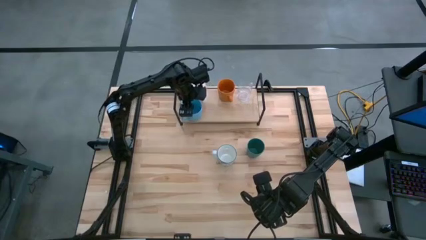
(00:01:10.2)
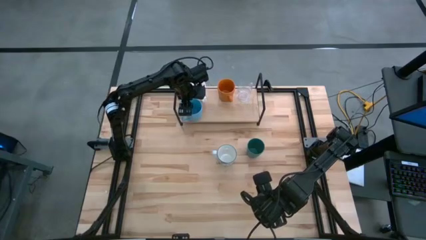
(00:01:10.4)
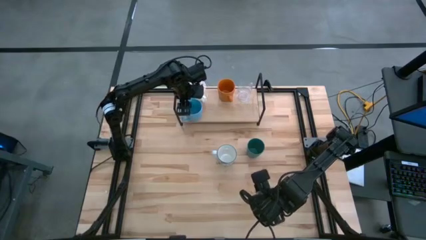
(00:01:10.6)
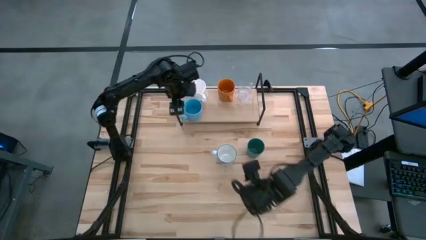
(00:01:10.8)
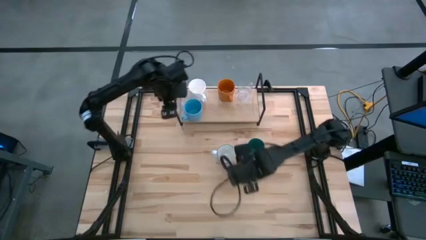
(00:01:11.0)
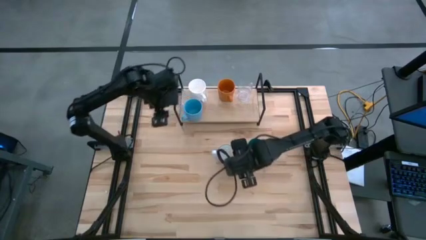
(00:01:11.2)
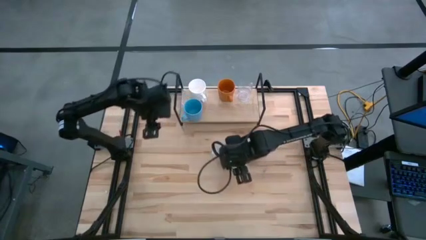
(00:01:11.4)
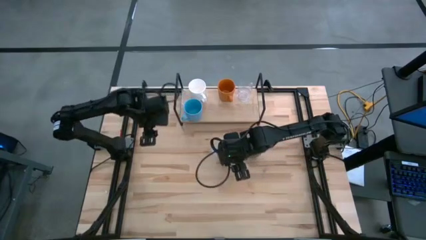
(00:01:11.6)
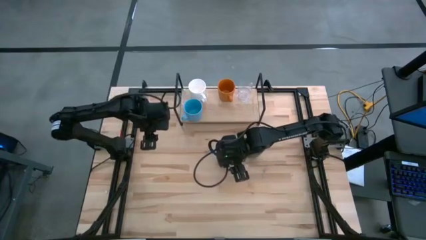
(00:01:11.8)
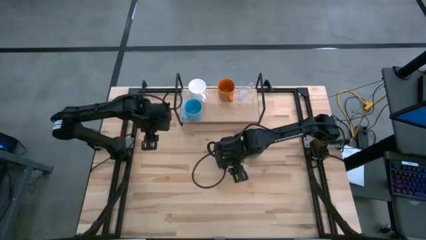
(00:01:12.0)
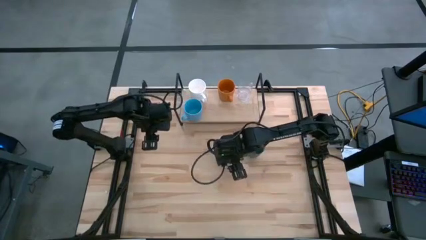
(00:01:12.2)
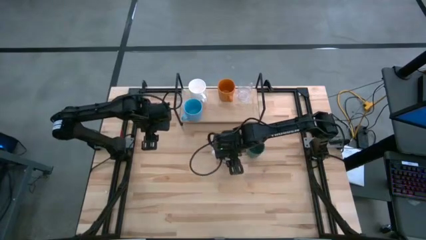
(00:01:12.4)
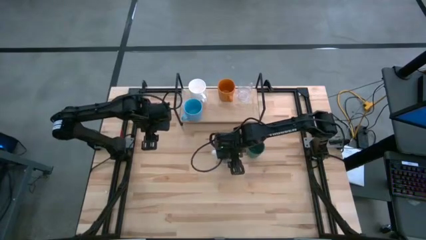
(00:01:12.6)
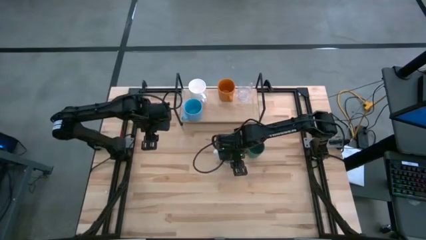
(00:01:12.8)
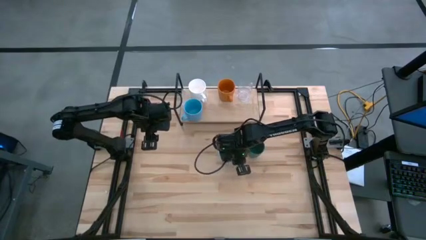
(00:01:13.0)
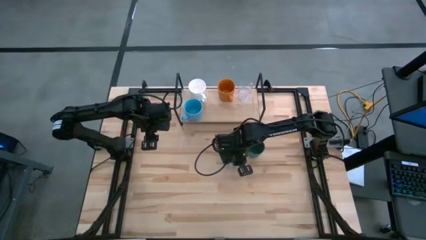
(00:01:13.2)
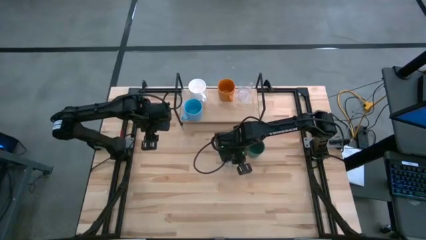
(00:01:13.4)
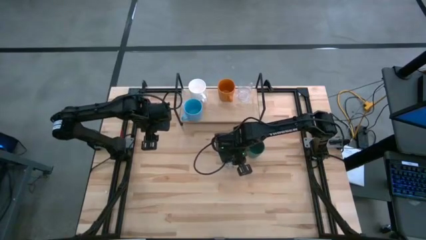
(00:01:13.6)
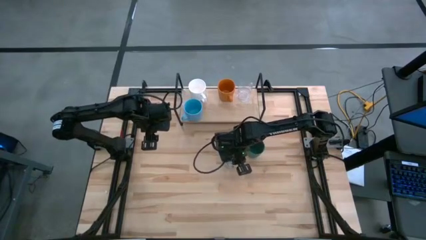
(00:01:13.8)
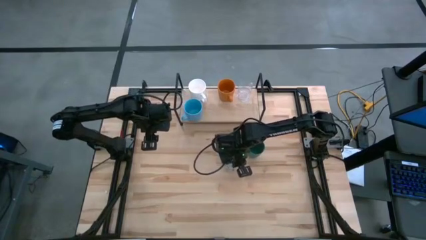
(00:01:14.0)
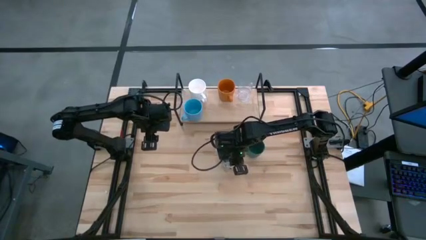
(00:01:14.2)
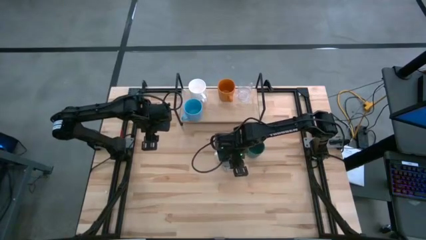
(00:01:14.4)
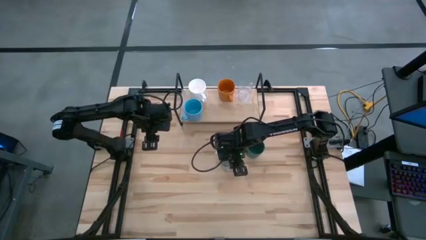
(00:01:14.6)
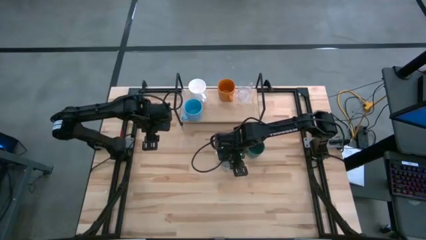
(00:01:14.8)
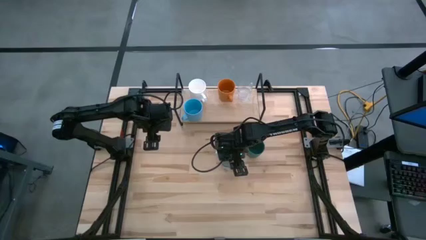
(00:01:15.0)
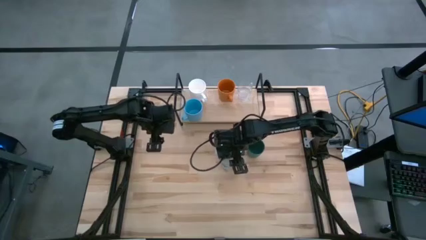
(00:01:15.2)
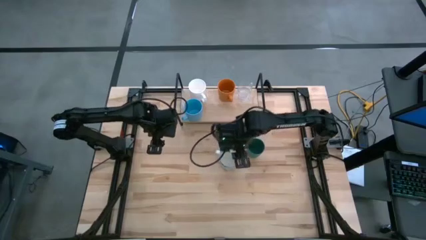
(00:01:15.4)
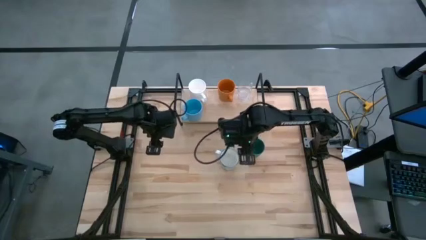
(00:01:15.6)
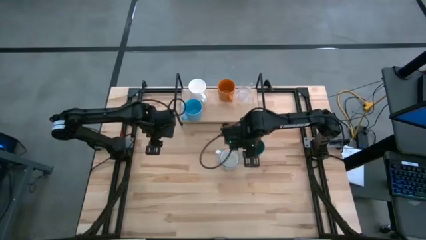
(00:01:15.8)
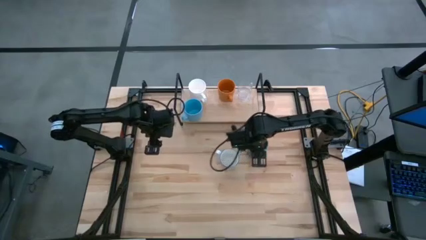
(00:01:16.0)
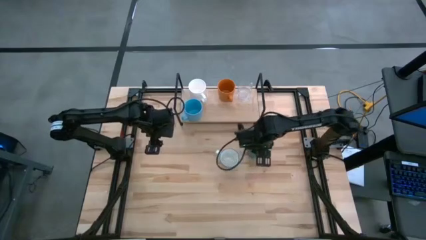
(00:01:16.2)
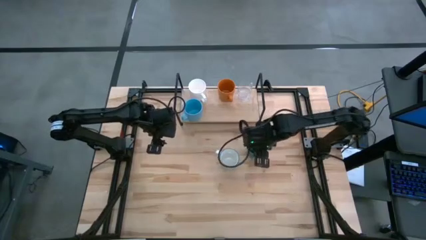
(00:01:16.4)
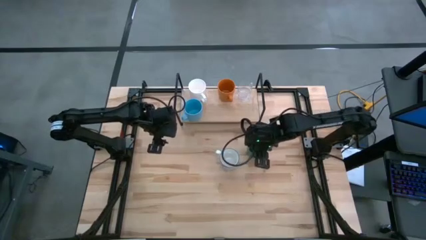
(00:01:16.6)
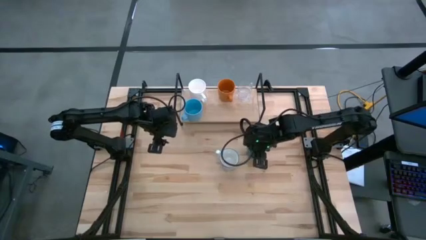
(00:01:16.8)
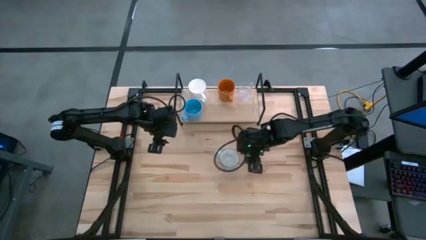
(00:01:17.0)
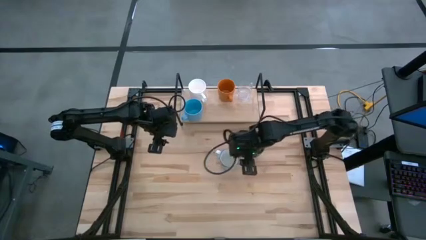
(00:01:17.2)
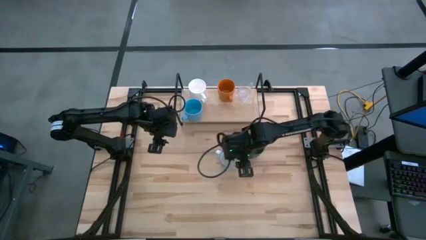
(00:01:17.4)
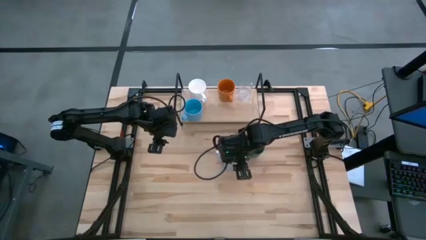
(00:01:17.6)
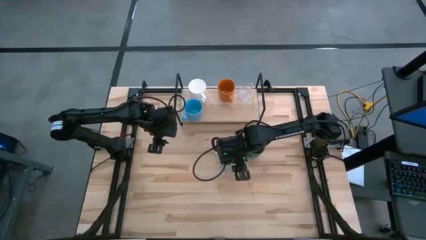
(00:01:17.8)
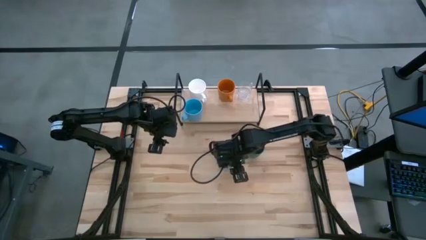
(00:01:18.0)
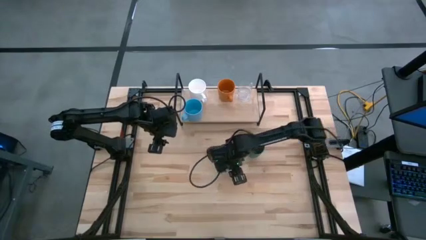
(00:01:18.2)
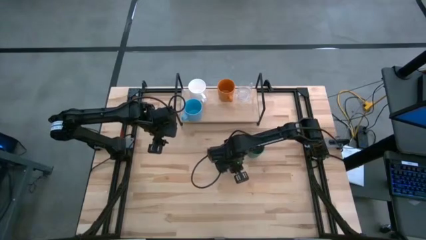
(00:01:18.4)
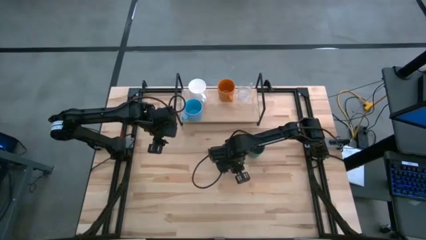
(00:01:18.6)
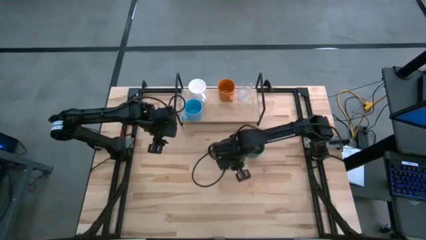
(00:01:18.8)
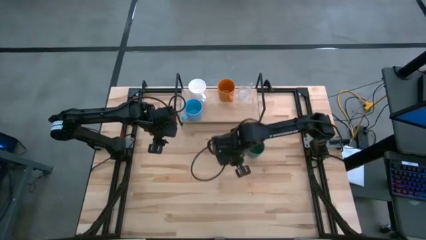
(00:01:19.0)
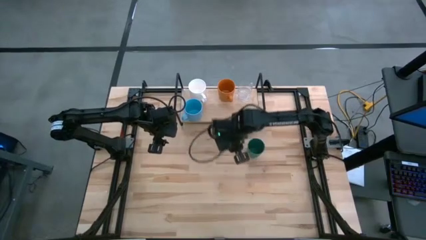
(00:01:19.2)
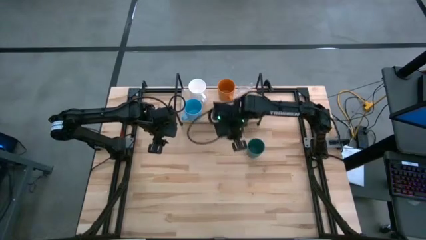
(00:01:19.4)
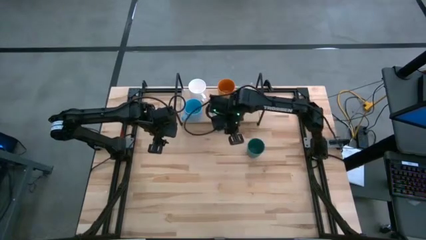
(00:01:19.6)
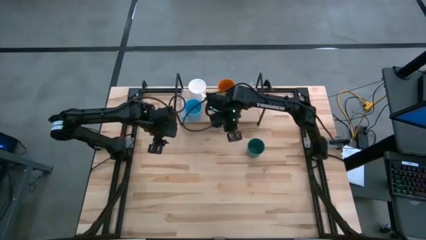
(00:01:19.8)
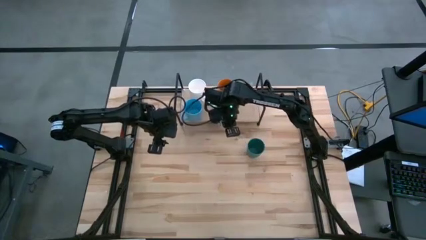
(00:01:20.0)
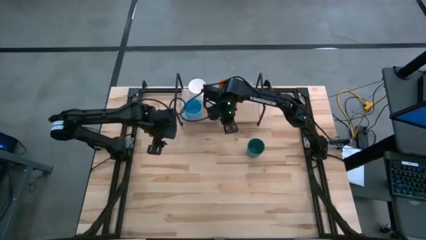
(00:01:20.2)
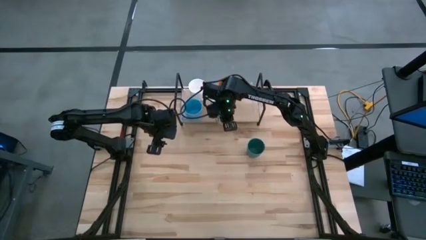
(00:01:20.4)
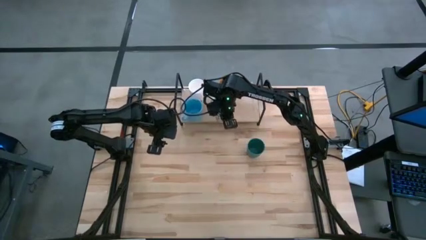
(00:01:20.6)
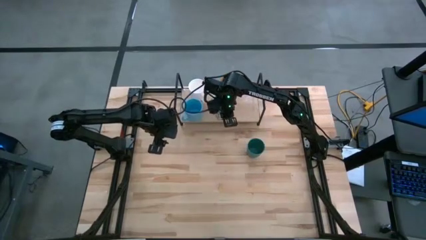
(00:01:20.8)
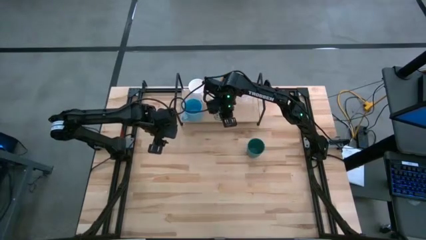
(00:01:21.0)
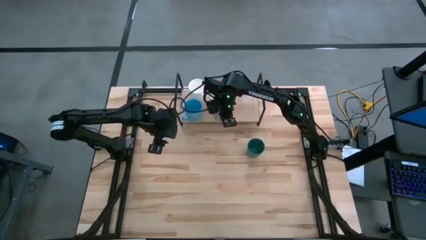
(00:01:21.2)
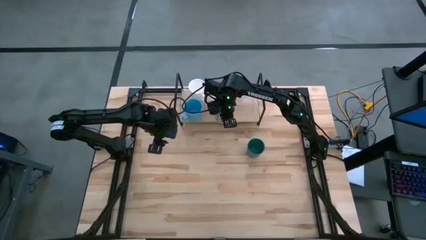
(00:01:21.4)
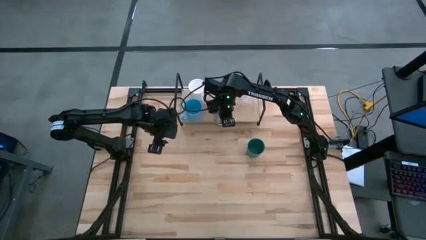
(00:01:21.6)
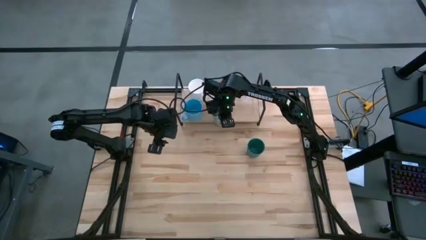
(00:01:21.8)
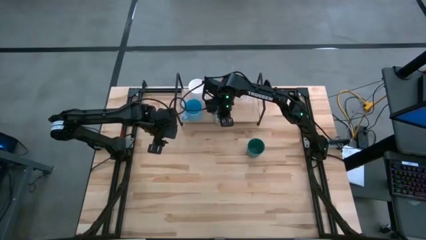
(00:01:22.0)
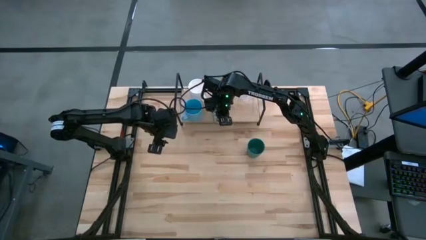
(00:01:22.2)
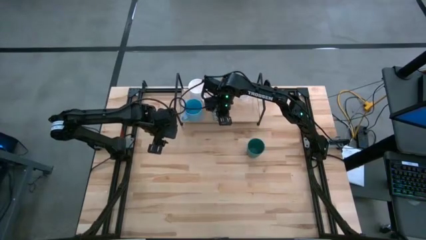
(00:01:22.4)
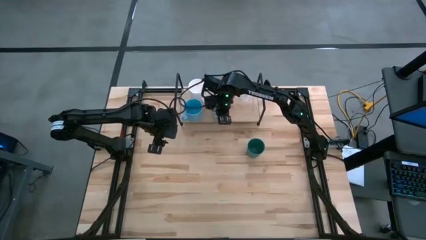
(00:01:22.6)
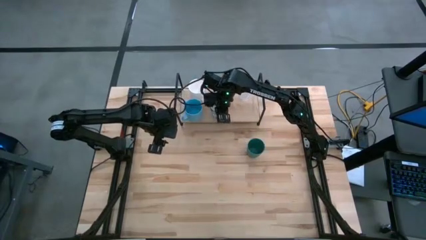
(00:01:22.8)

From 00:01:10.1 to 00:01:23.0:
Task: Stack small to large cups/mugs on shelf
Put the blue patterned mug on the shelf
